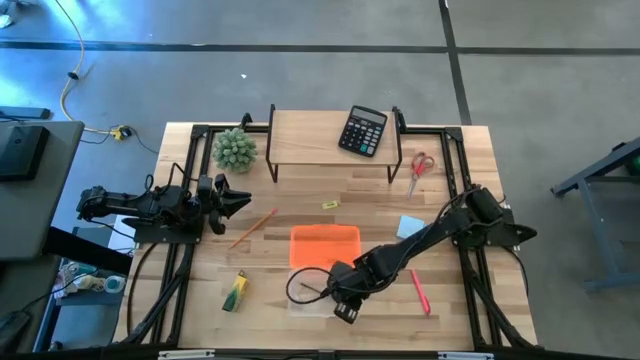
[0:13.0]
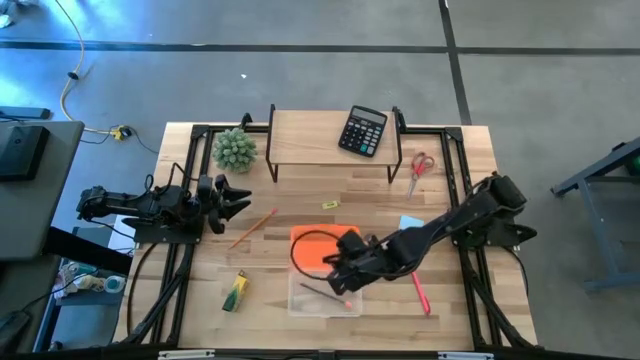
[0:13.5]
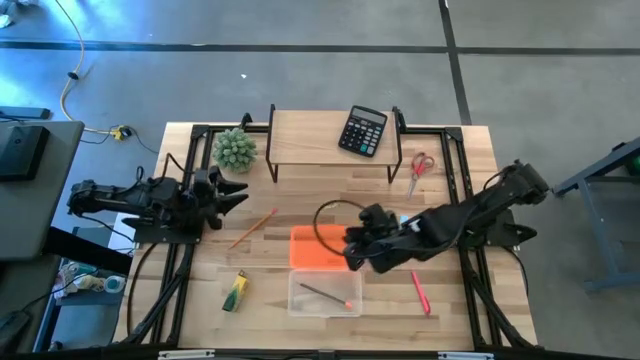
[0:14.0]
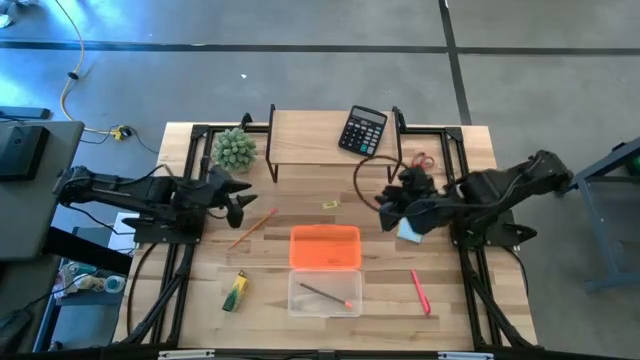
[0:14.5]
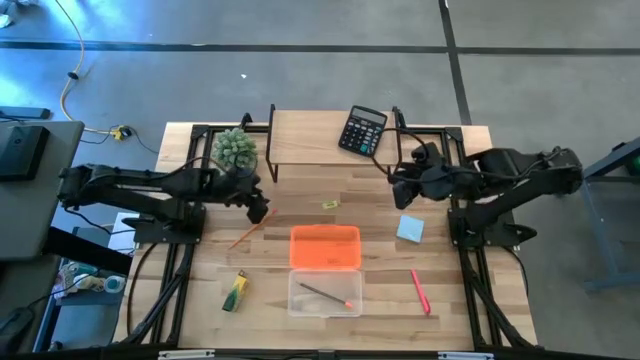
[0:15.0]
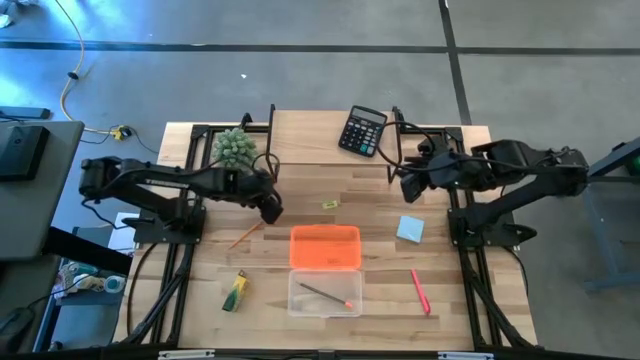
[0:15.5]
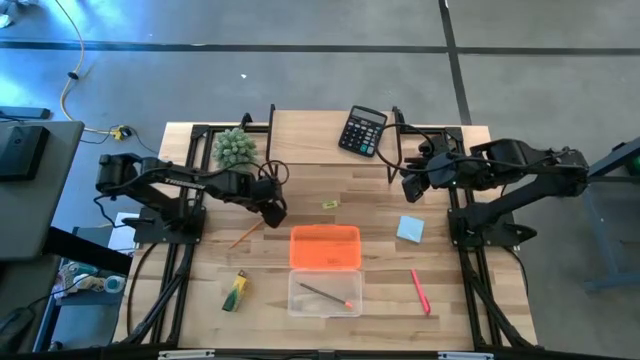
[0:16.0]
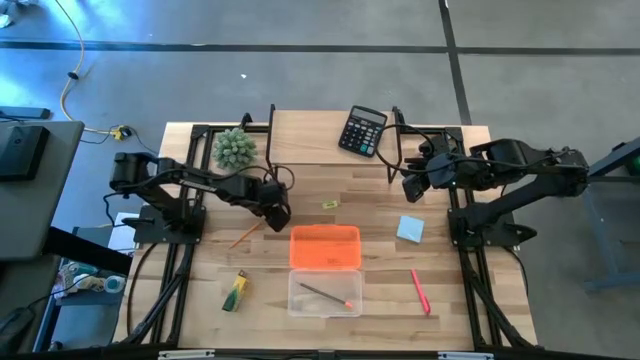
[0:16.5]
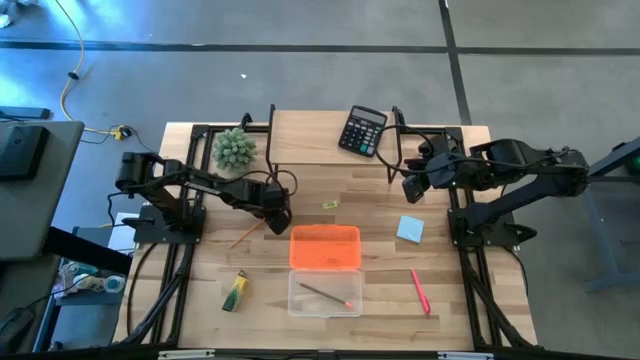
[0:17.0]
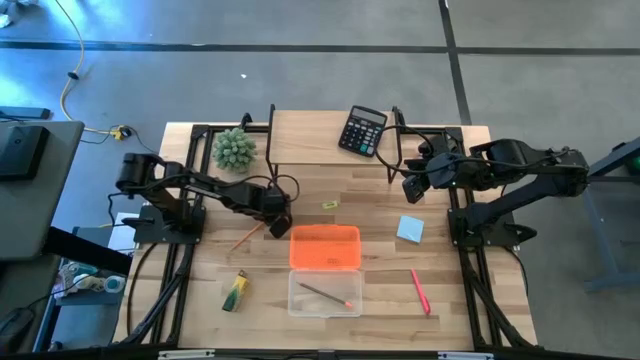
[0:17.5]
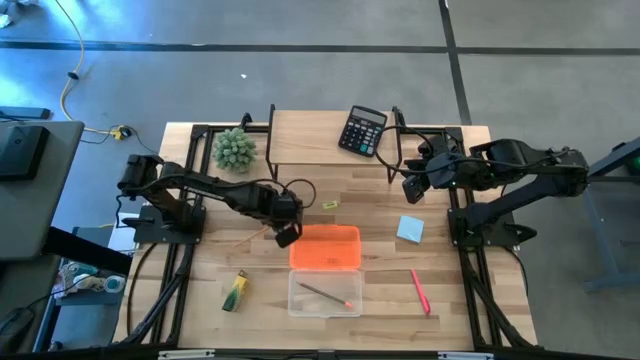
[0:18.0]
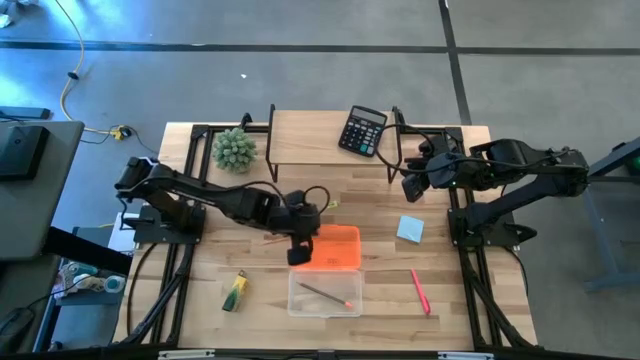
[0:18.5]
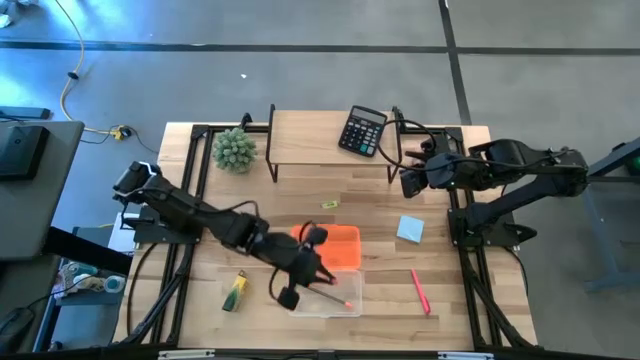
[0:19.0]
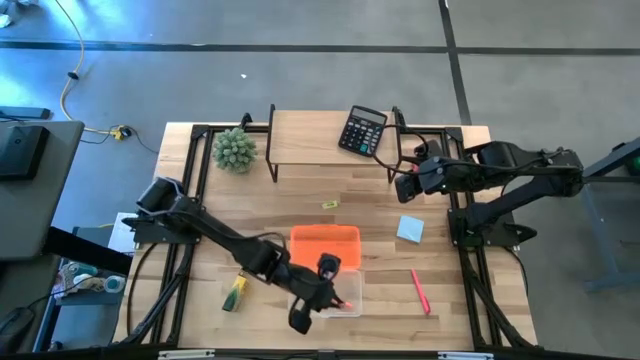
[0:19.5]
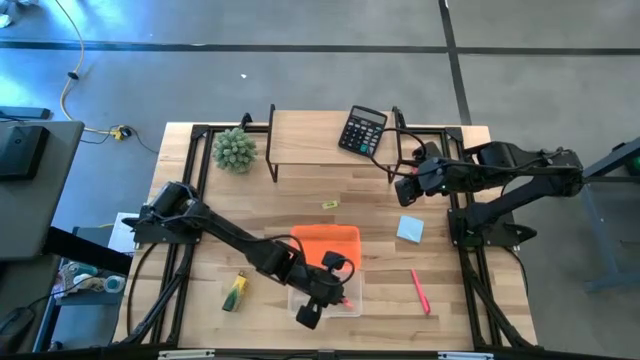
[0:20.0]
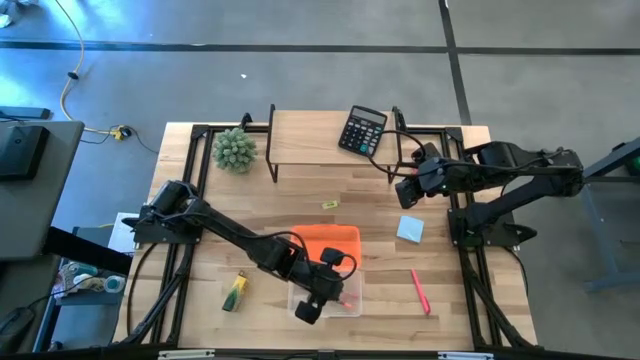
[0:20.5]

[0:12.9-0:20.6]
Task: Pack school essentials
Put the orange pencil into the orange supply box

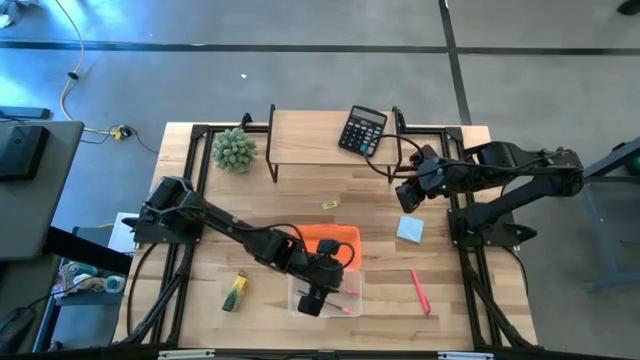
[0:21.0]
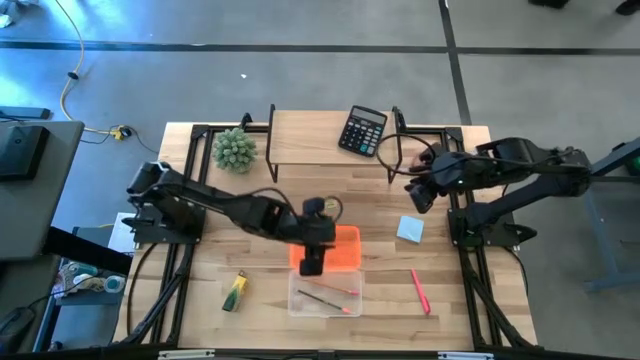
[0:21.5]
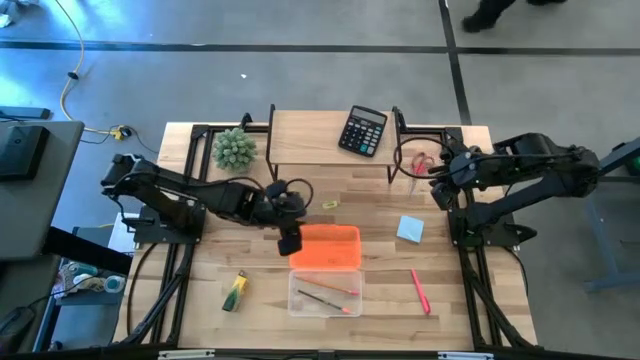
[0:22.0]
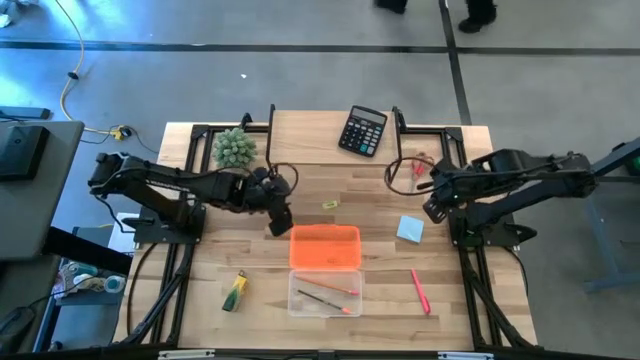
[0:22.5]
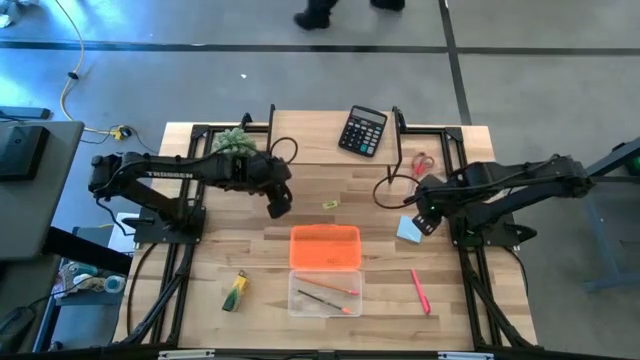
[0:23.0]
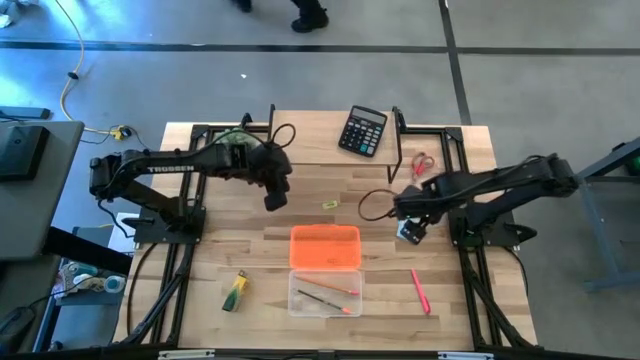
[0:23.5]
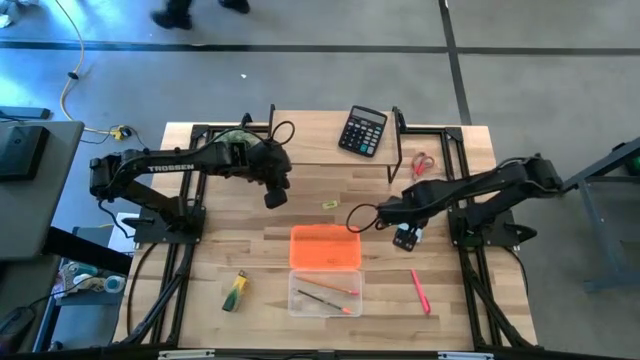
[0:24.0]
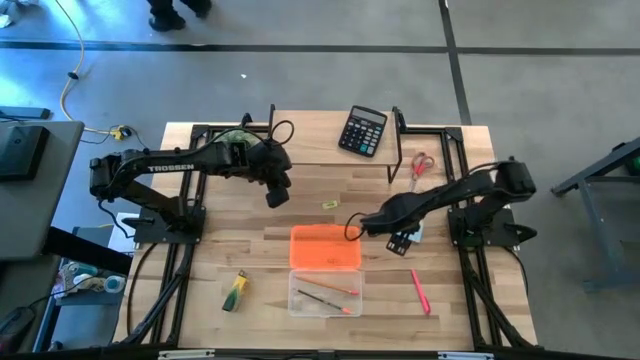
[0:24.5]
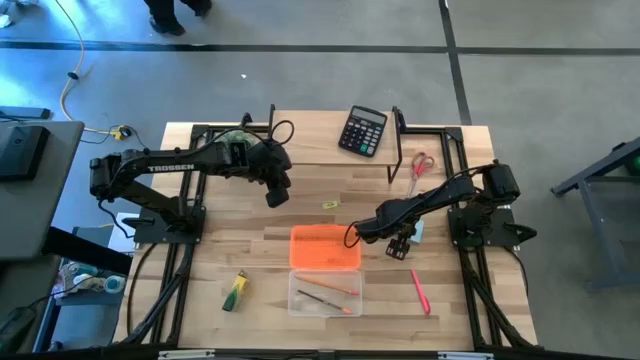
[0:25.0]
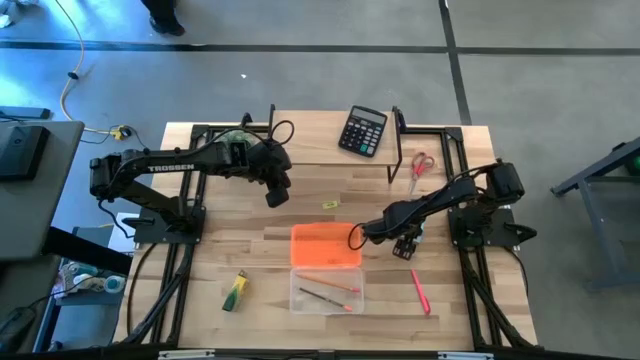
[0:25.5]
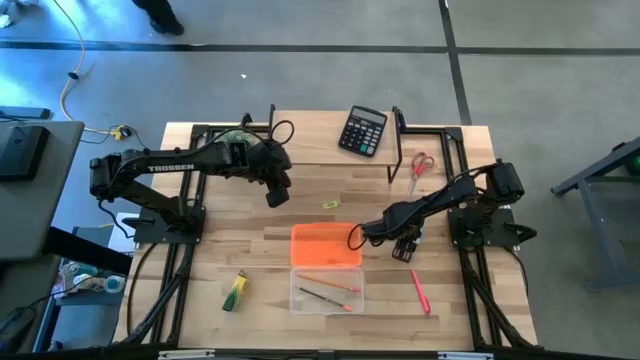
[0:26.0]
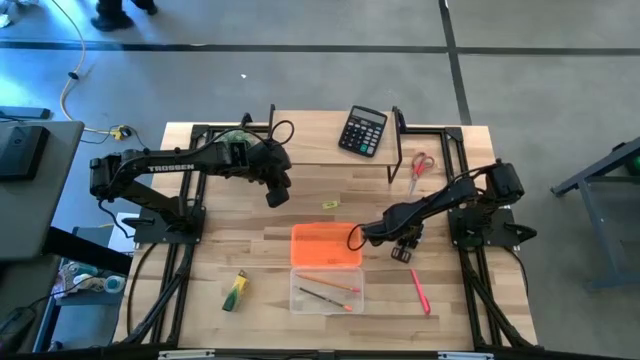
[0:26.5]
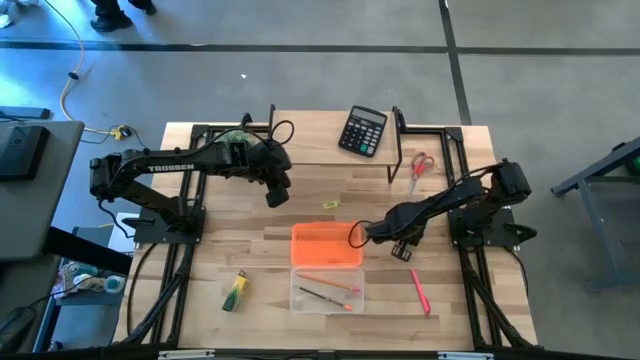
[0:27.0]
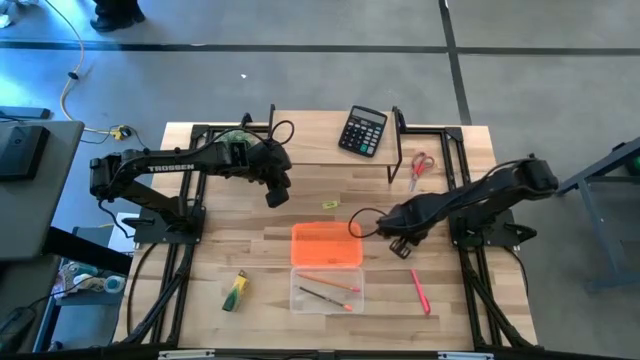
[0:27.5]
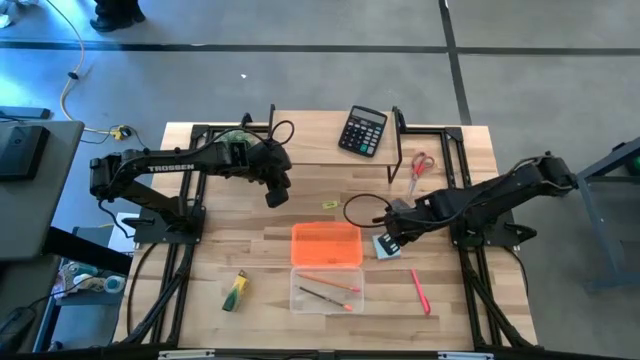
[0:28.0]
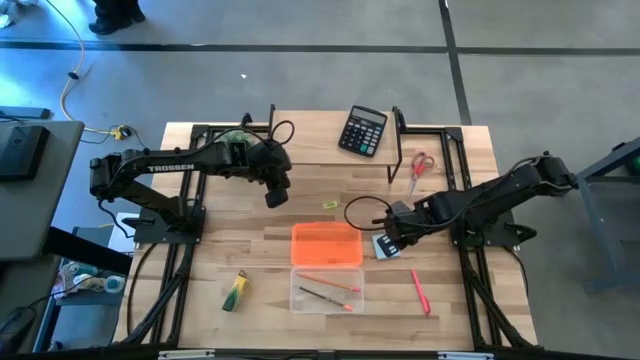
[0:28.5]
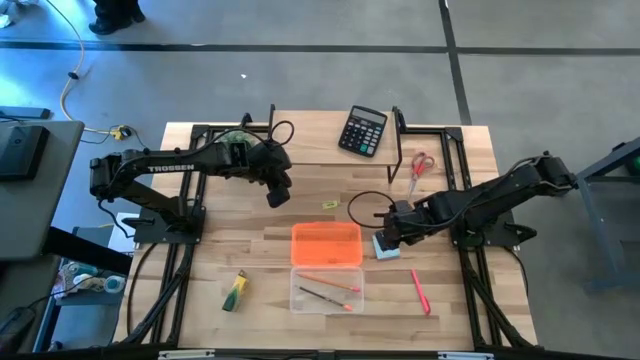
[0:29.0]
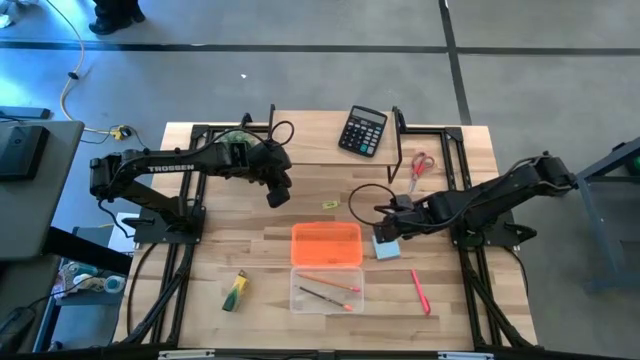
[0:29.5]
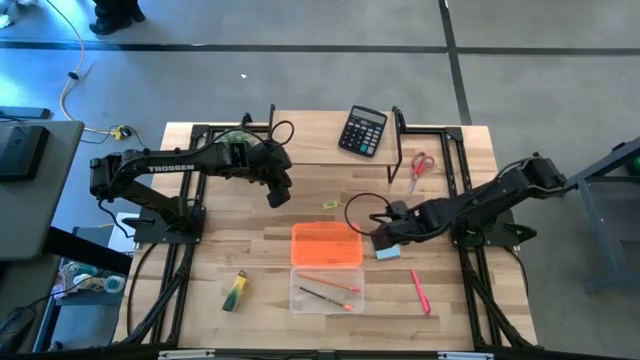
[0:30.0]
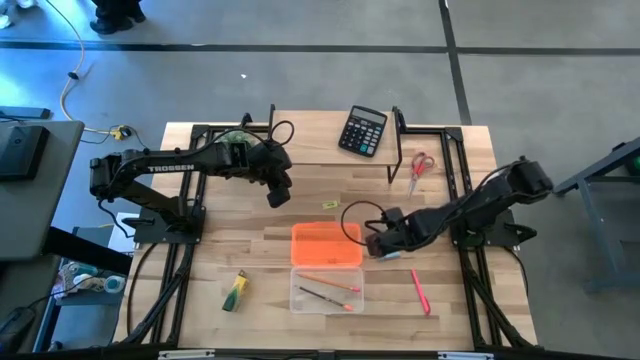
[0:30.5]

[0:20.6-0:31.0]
Put the blue sticky notes into the orange supply box

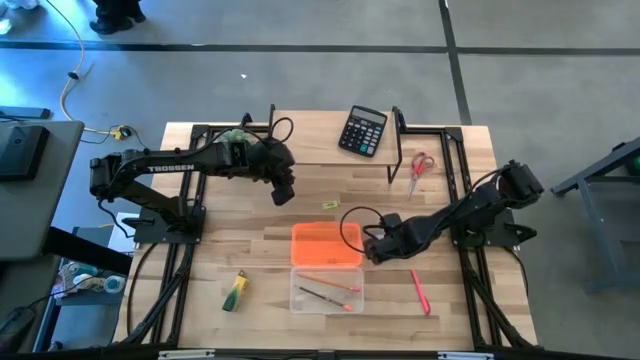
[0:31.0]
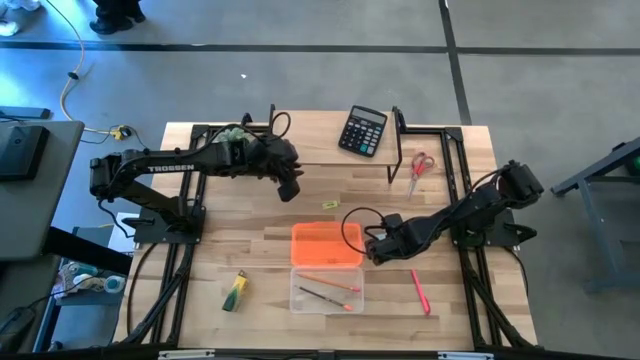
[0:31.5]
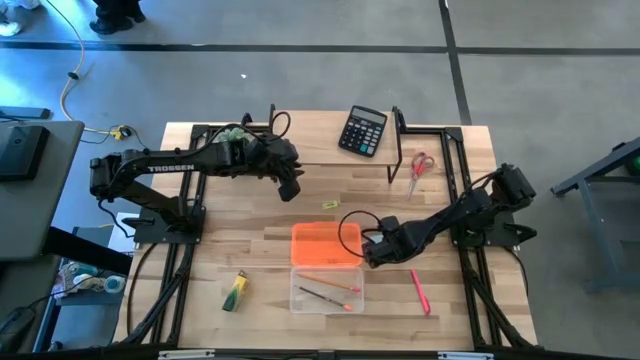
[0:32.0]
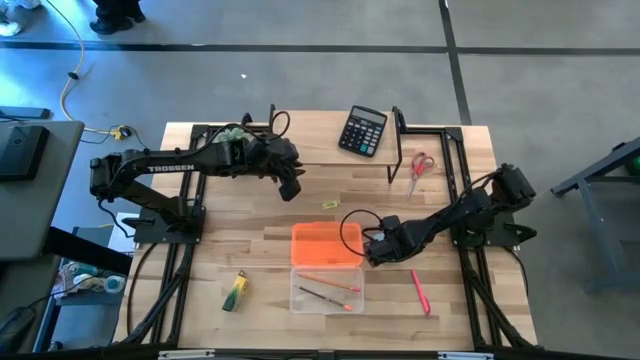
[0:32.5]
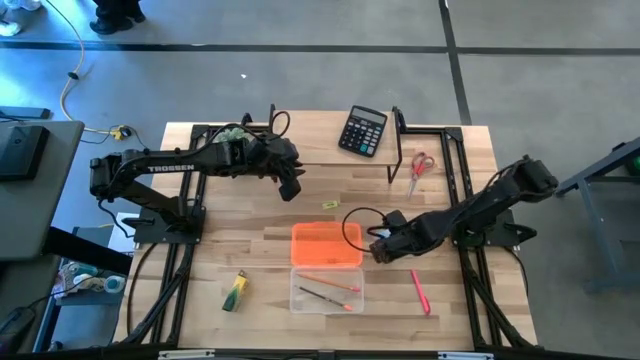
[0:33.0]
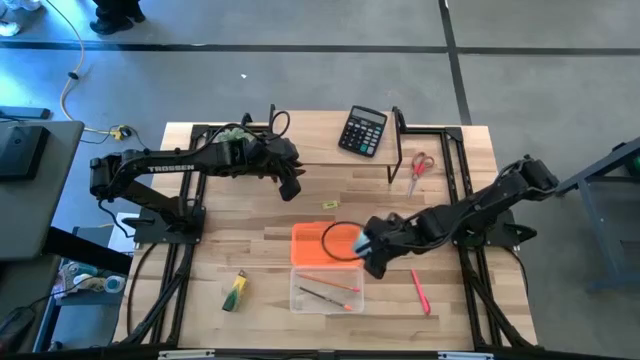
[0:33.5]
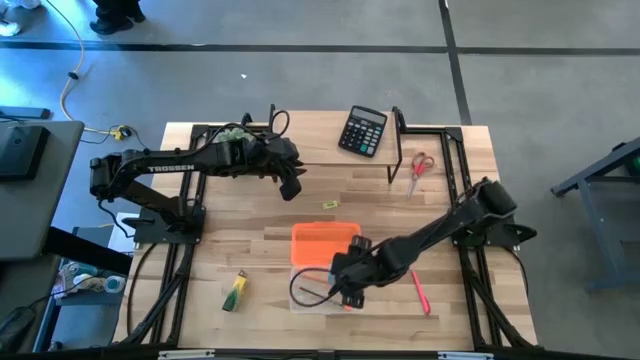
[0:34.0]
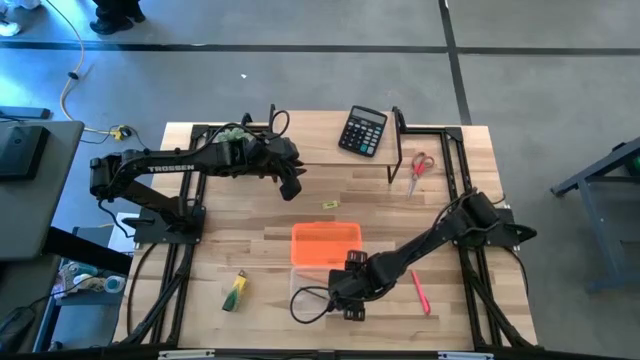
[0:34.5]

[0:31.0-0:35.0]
Put the blue sticky notes into the orange supply box
